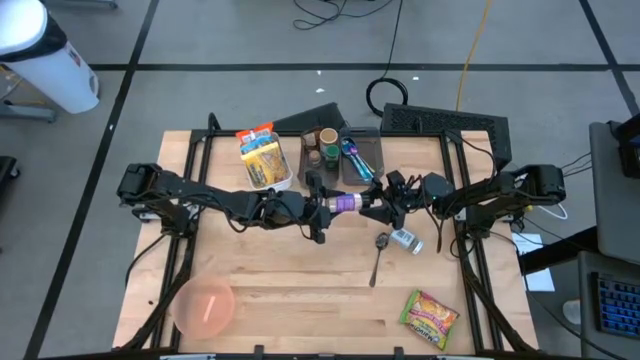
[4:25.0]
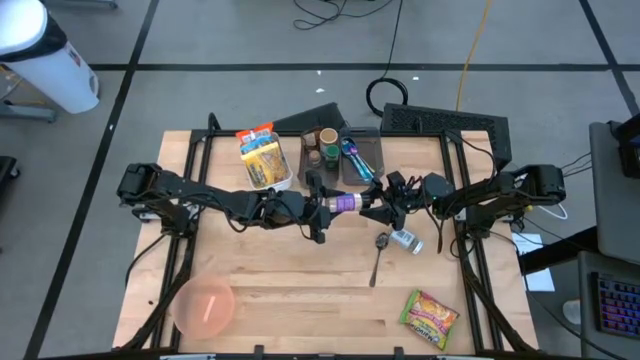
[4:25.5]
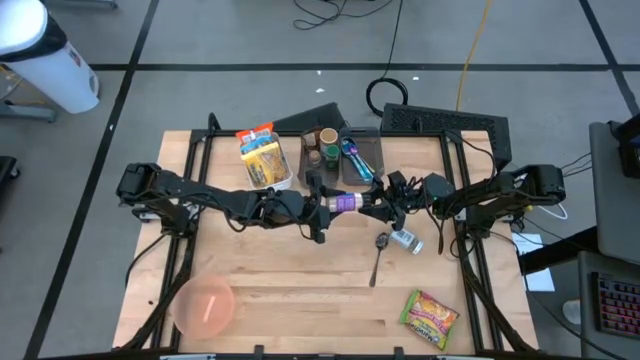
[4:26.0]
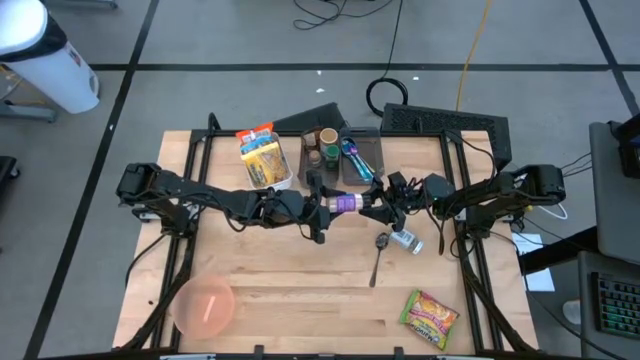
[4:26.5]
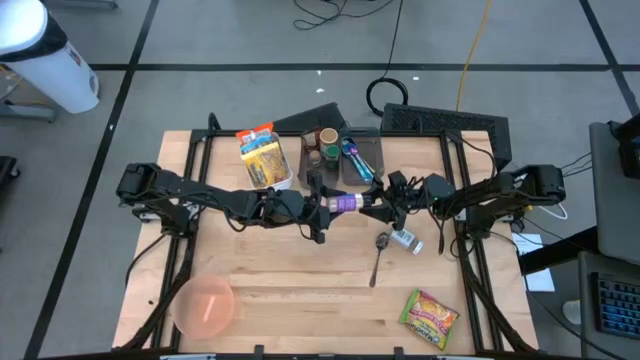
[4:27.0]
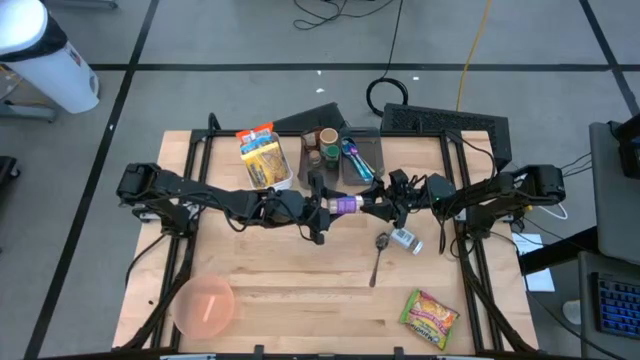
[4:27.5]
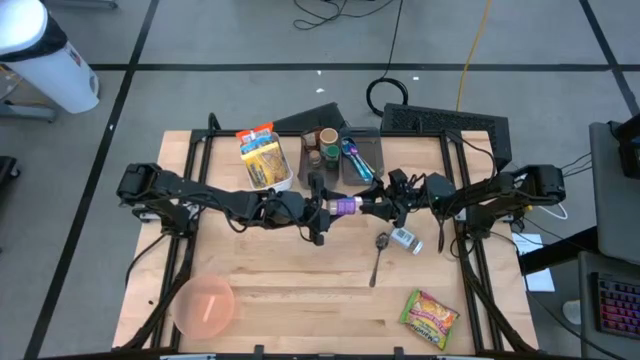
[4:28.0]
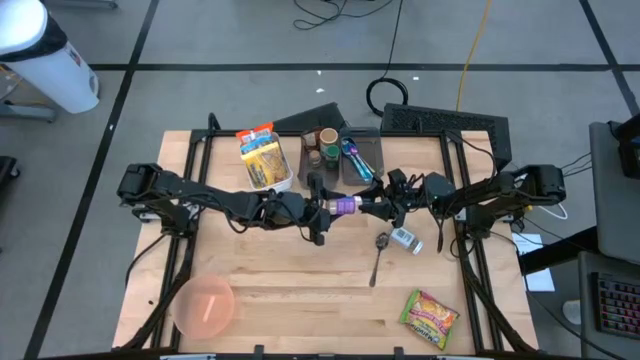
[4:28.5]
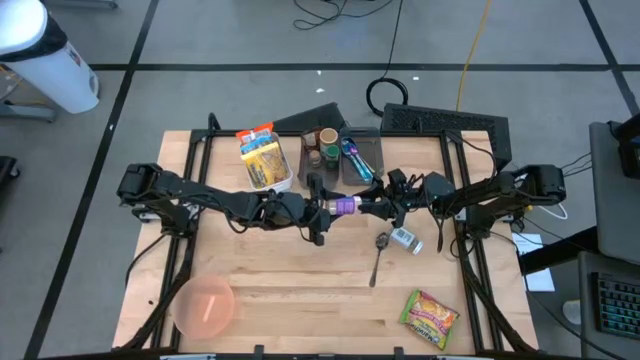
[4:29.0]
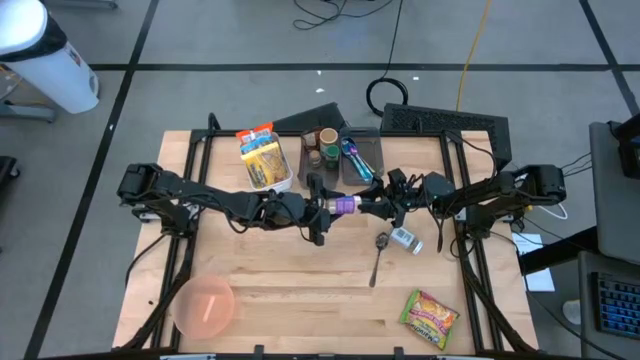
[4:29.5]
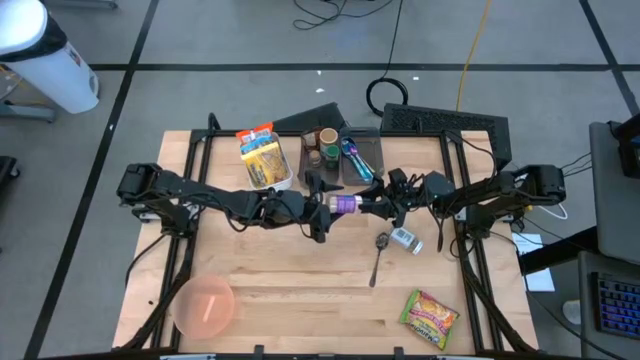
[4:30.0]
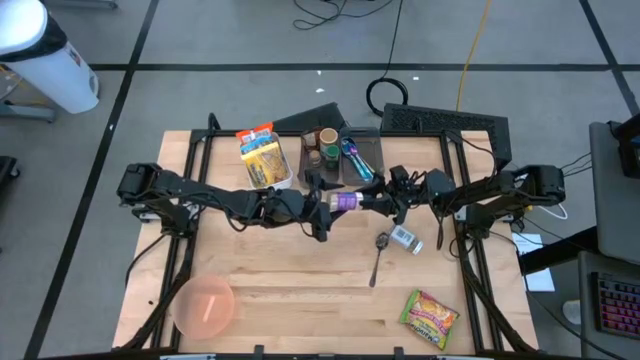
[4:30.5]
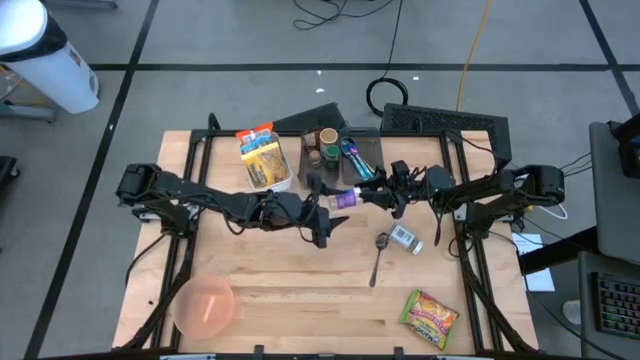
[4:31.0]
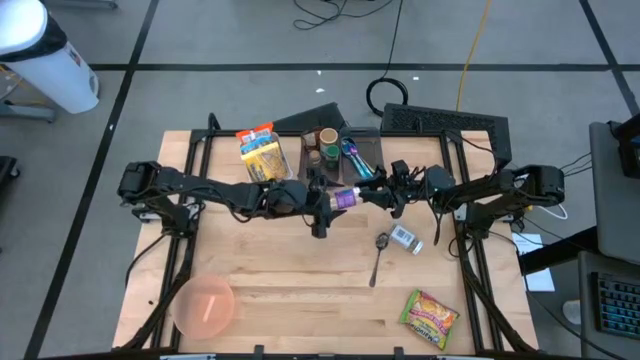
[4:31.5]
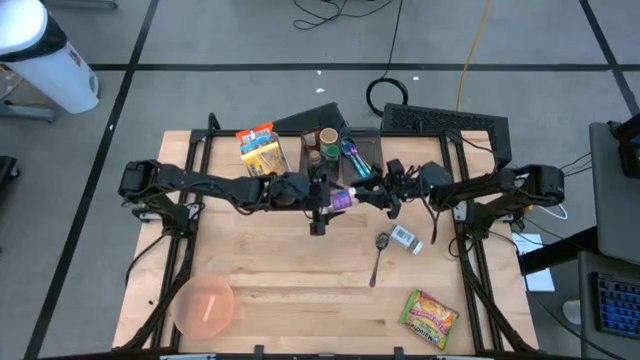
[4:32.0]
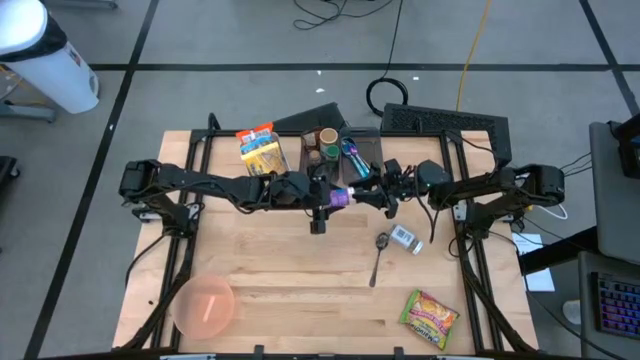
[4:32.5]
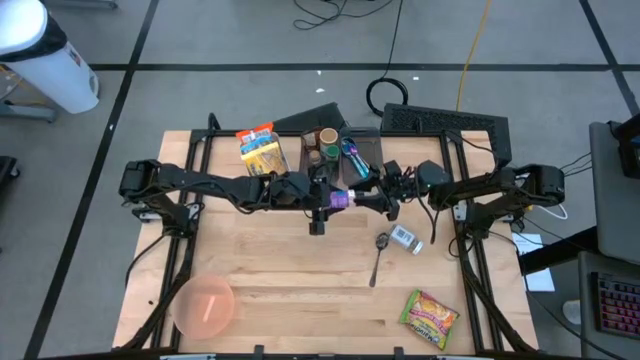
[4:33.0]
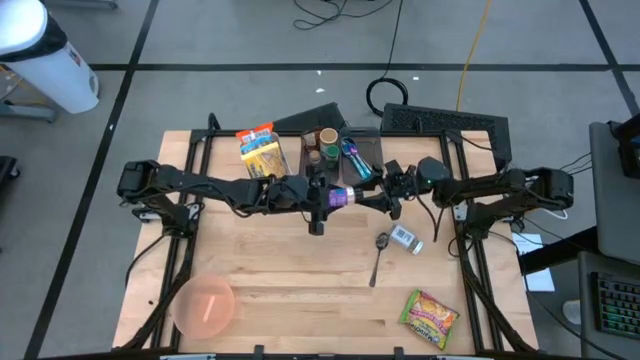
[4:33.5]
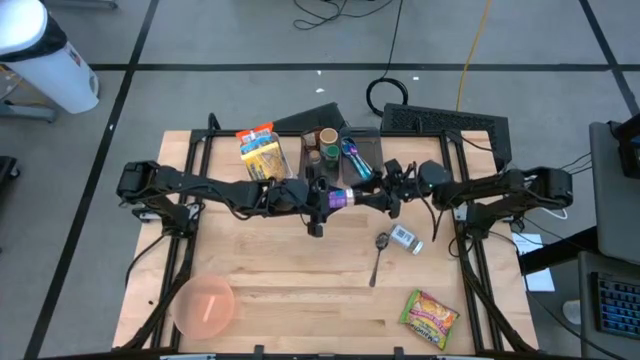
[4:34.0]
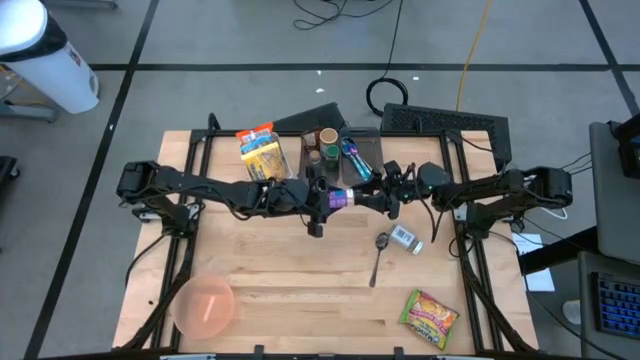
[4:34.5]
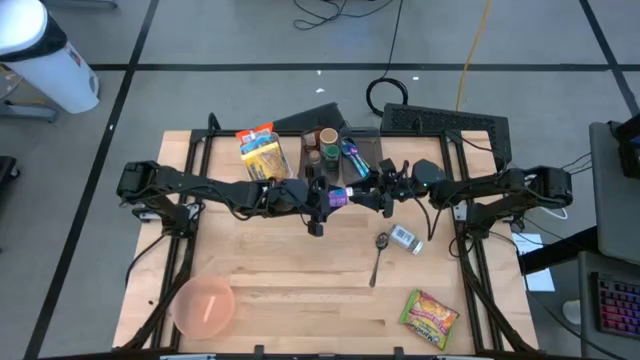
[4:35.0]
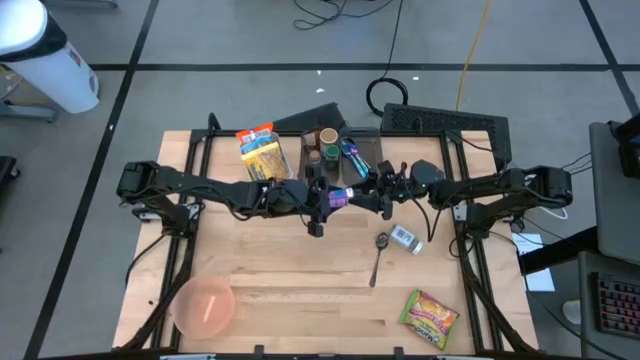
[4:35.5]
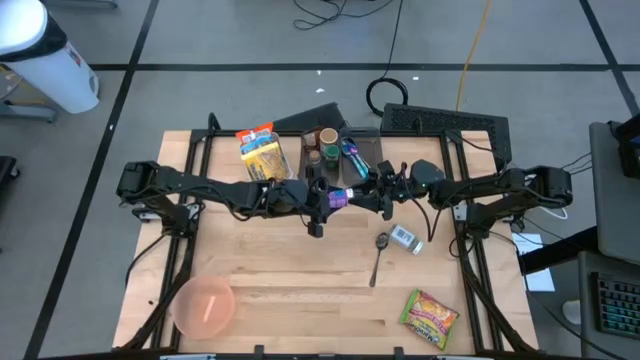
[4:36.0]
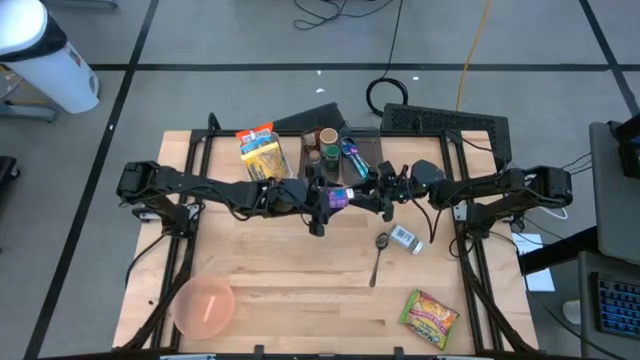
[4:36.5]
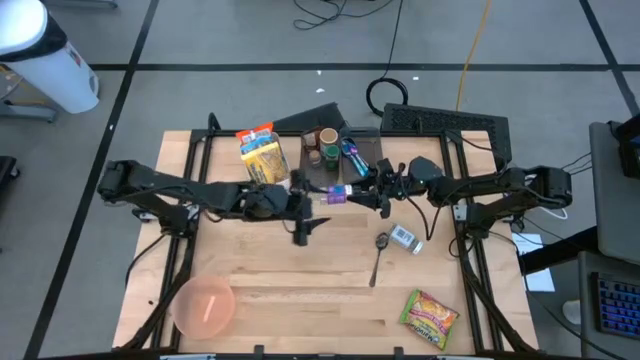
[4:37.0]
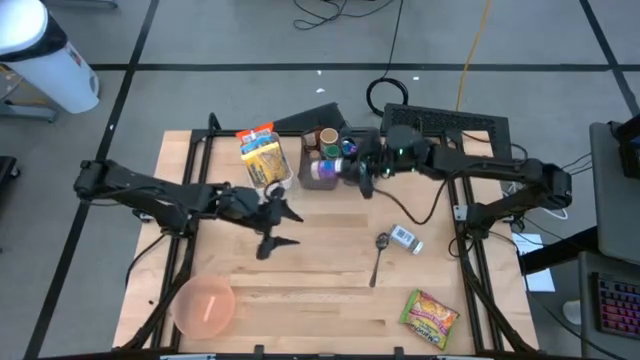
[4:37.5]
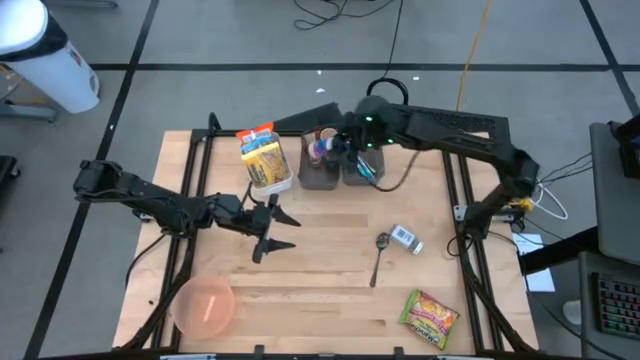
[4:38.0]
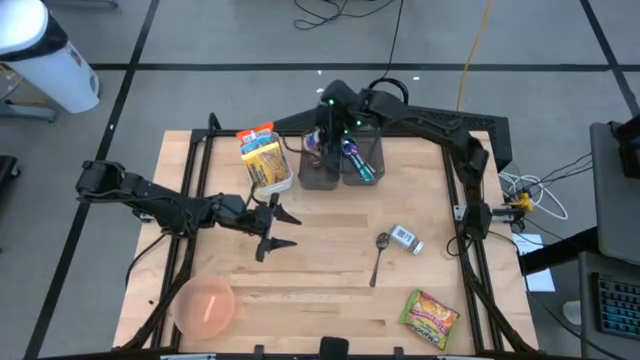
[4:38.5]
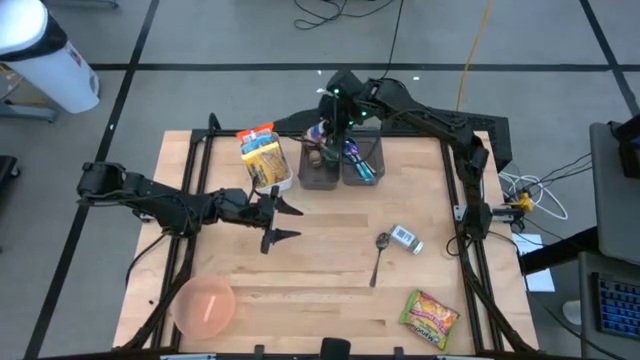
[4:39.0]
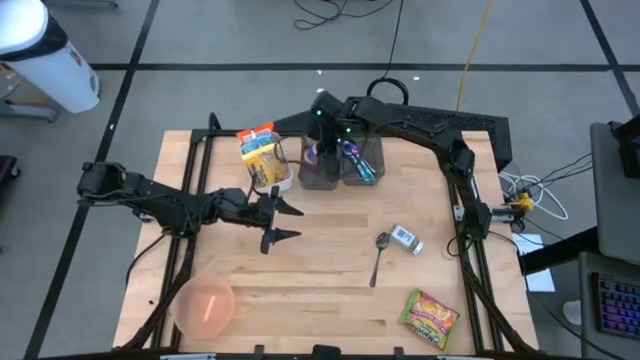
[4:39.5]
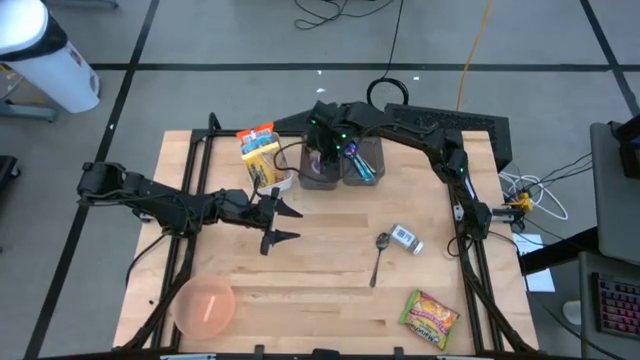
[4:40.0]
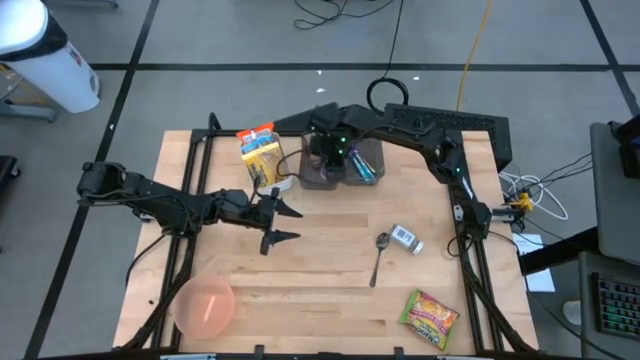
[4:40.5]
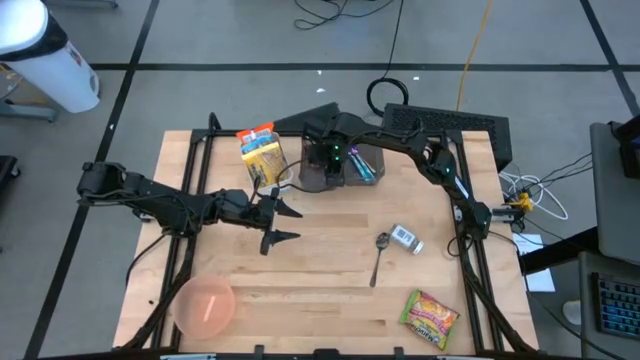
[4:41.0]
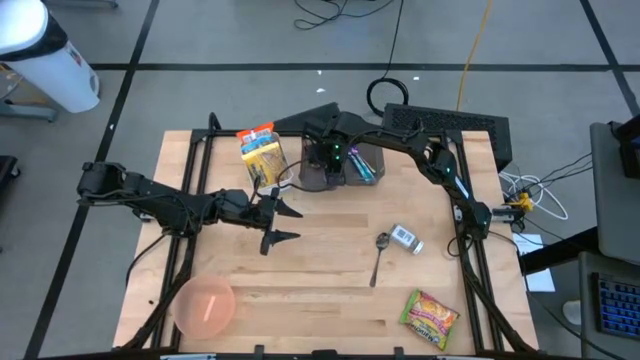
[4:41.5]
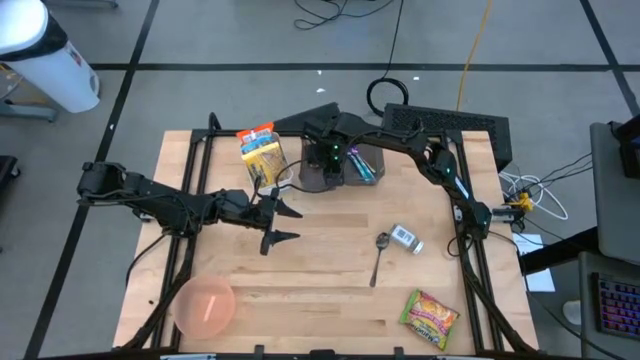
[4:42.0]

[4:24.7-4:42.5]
Task: Pick & Place Food Item
Put the purple seasoning bottle into the left black bin

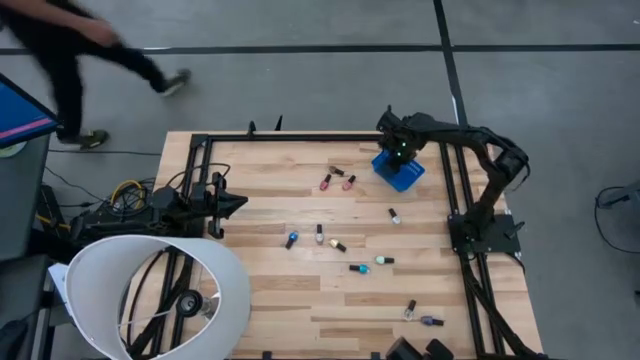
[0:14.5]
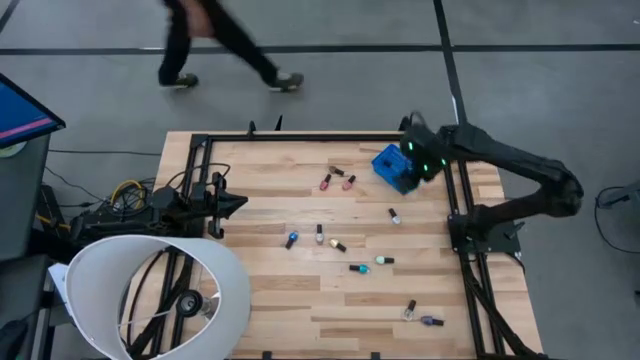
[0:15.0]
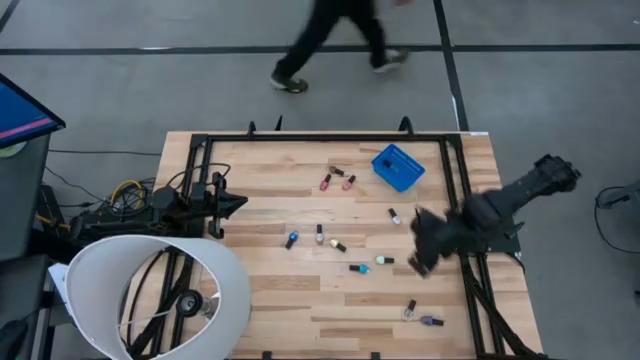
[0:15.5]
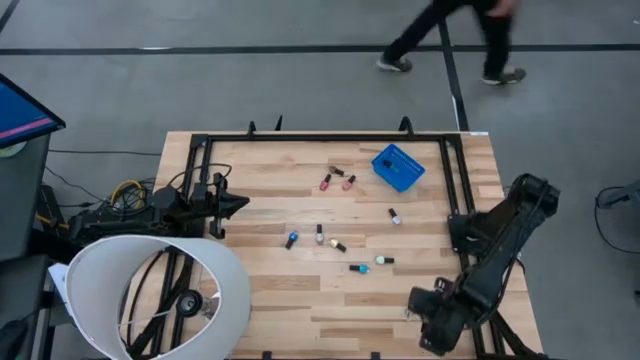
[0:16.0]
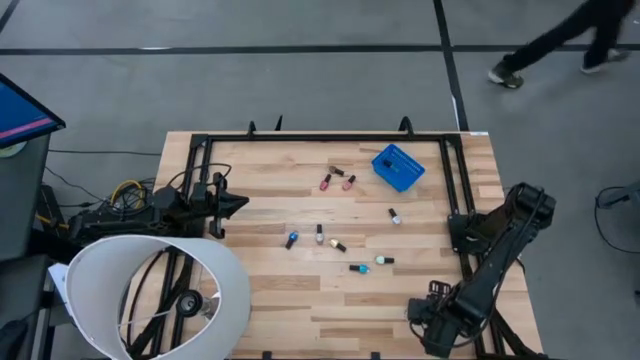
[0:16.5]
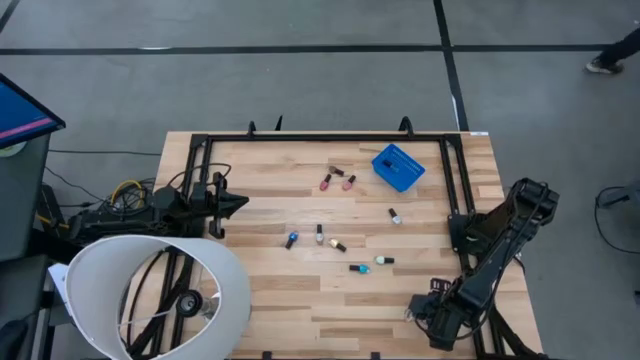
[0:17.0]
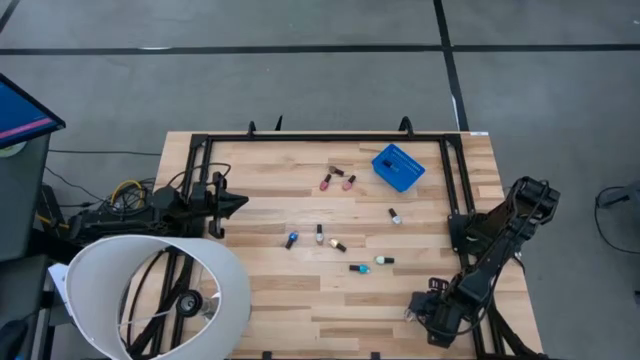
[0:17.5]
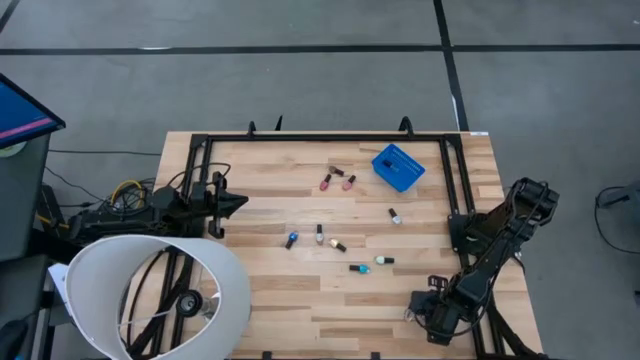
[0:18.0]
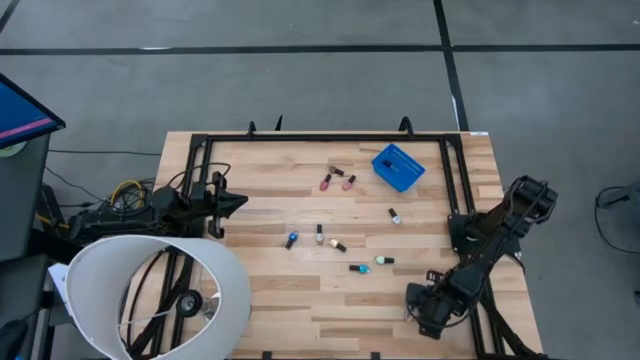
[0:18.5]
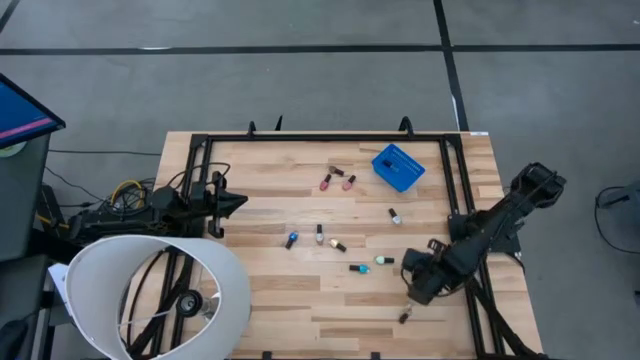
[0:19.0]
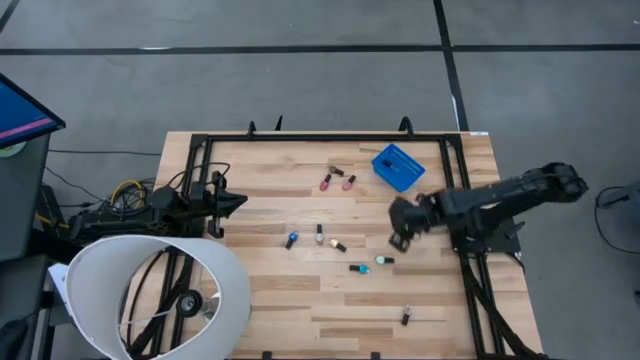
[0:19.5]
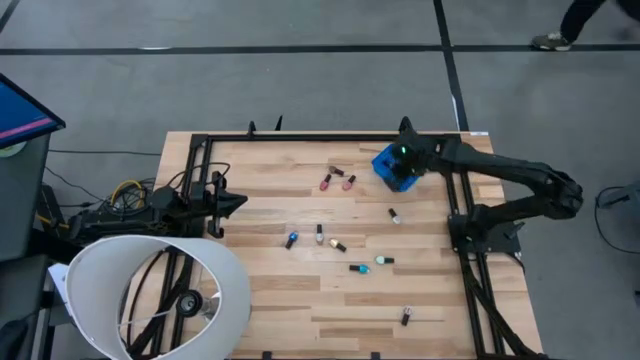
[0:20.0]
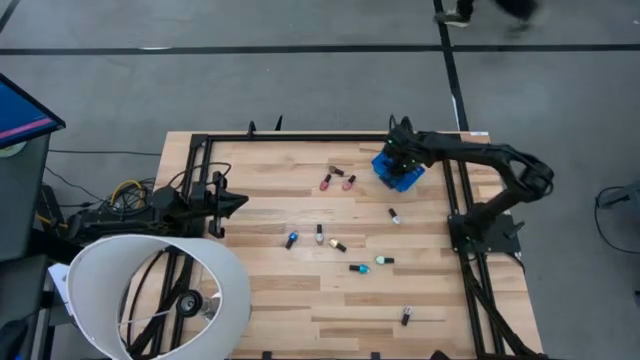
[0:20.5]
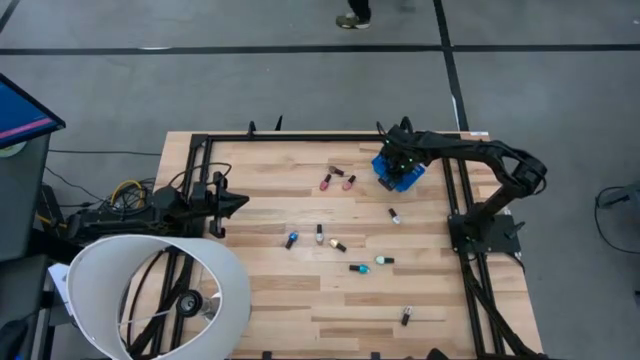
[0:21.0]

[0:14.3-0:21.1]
Task: Pick & Place Nail Polish
Put the purple nail polish bottle into the blue bin
